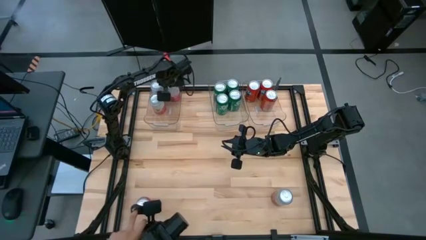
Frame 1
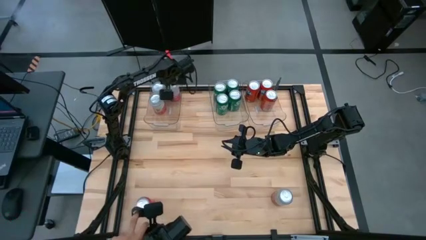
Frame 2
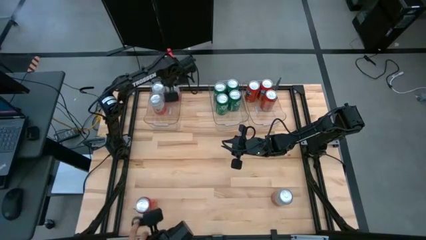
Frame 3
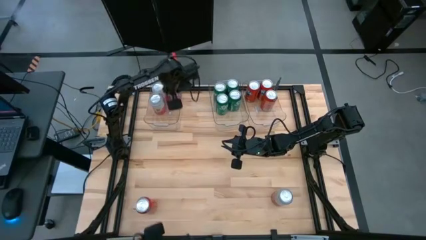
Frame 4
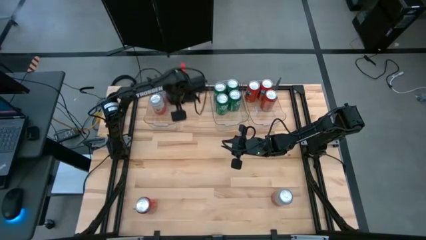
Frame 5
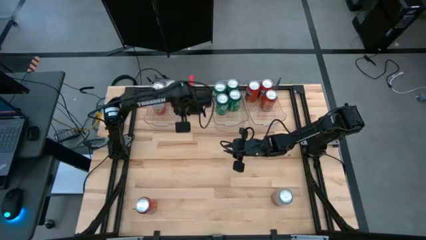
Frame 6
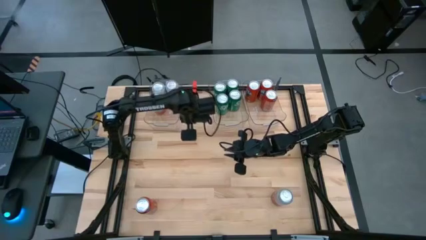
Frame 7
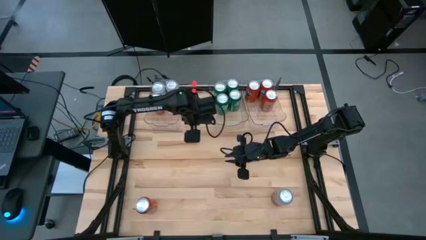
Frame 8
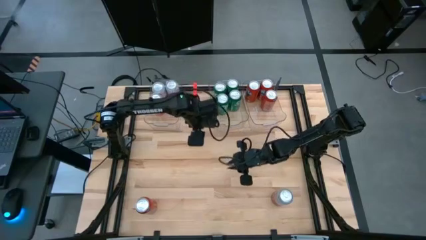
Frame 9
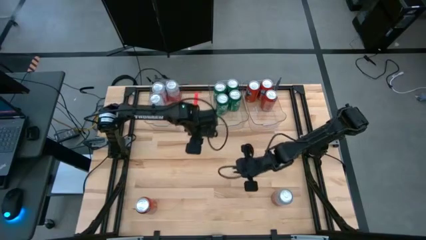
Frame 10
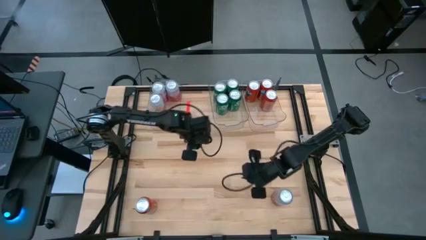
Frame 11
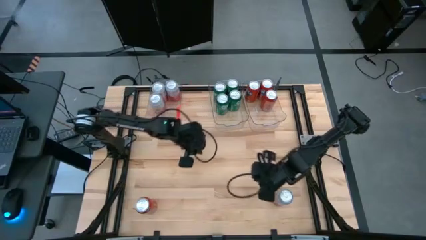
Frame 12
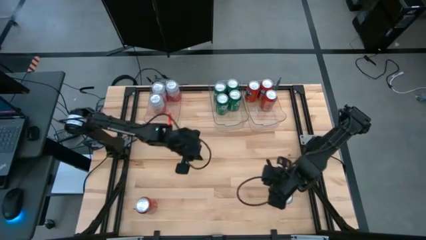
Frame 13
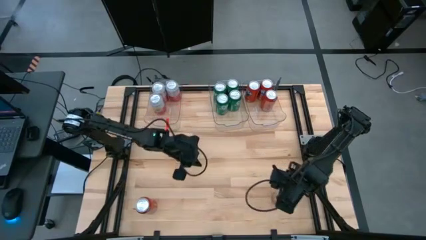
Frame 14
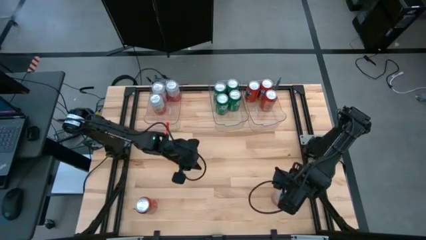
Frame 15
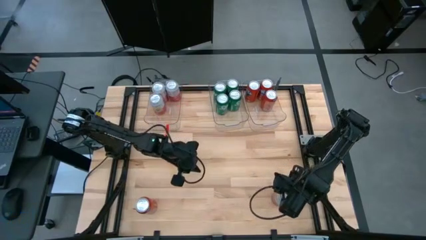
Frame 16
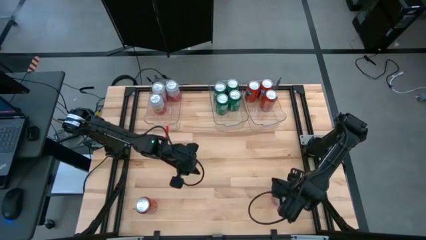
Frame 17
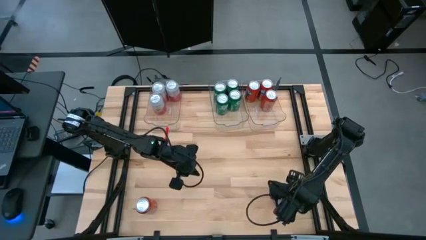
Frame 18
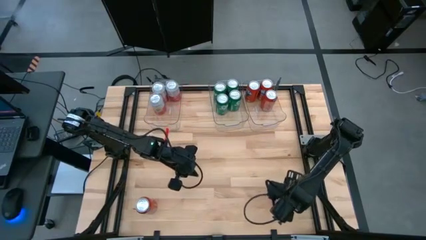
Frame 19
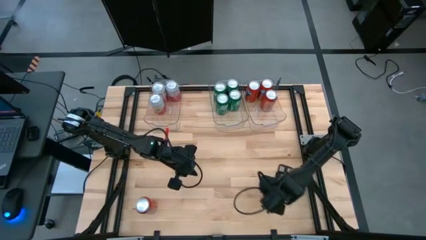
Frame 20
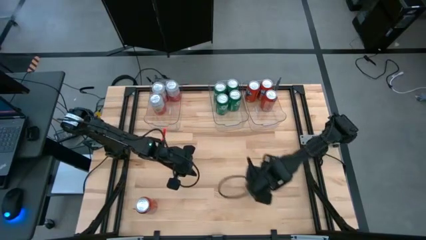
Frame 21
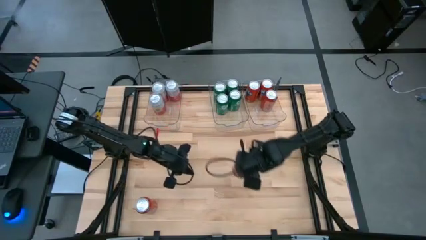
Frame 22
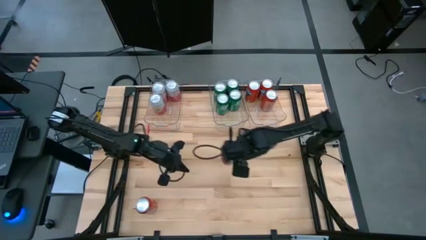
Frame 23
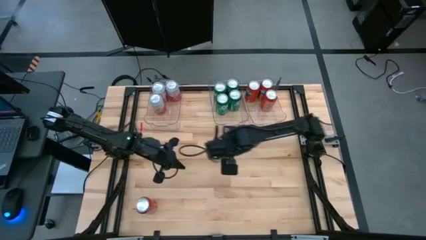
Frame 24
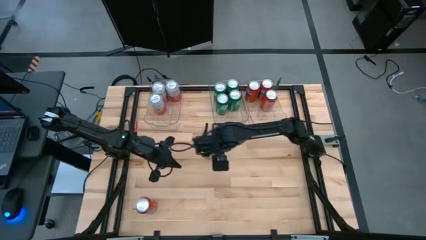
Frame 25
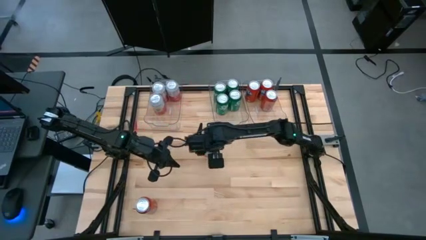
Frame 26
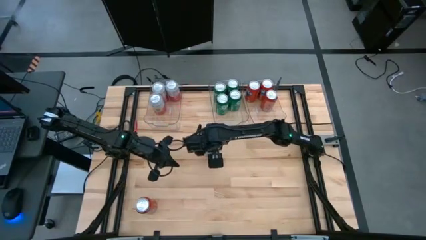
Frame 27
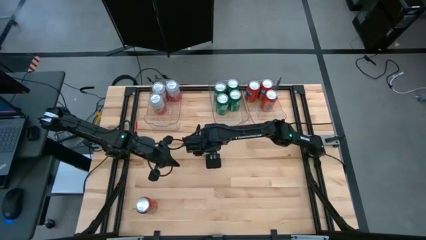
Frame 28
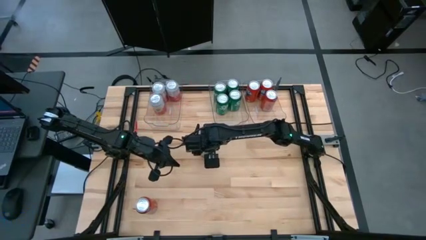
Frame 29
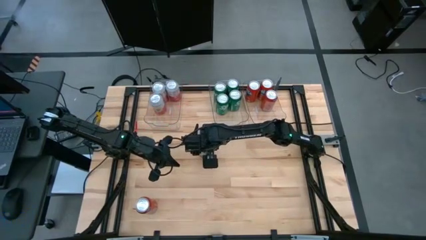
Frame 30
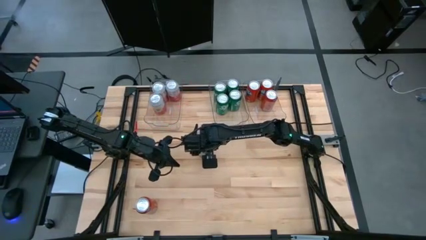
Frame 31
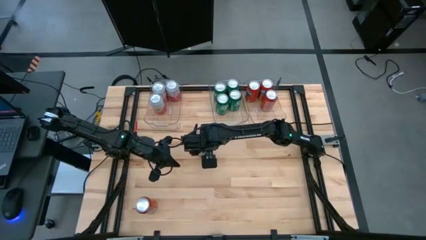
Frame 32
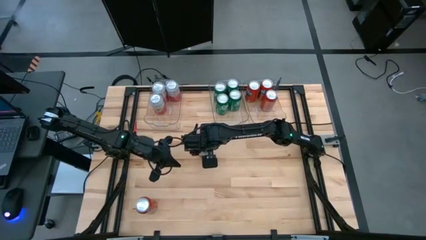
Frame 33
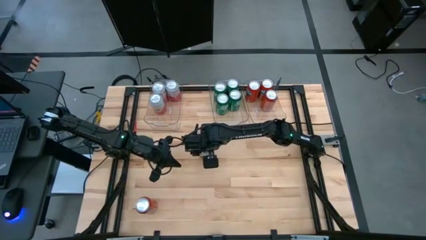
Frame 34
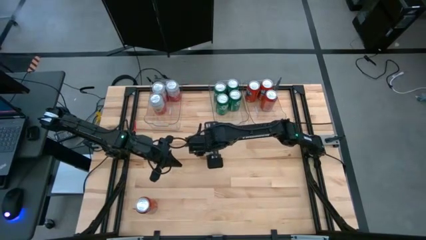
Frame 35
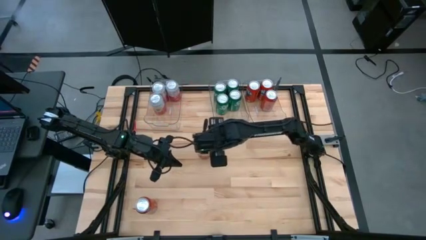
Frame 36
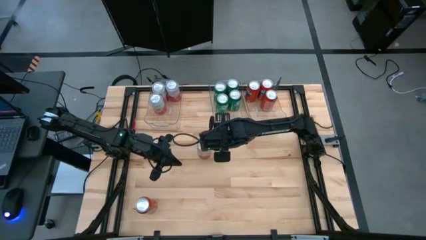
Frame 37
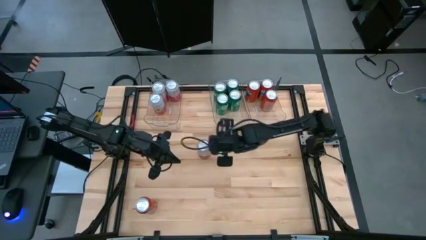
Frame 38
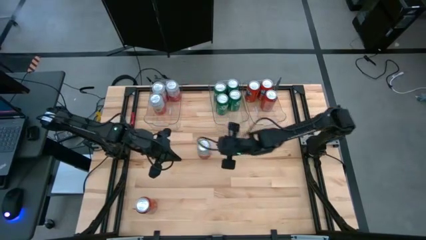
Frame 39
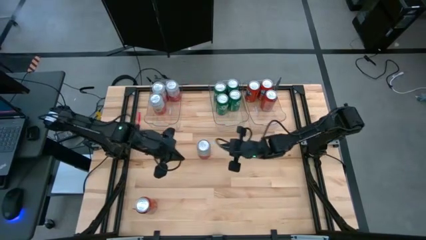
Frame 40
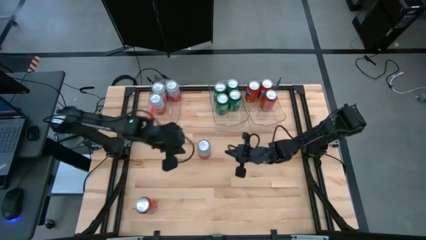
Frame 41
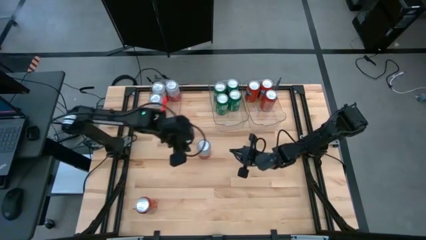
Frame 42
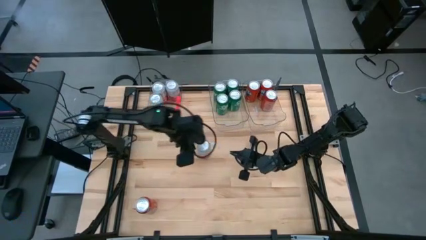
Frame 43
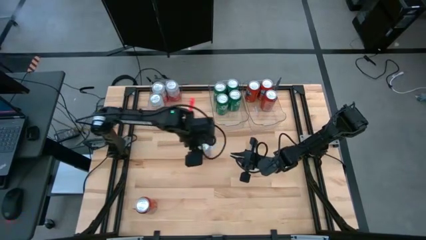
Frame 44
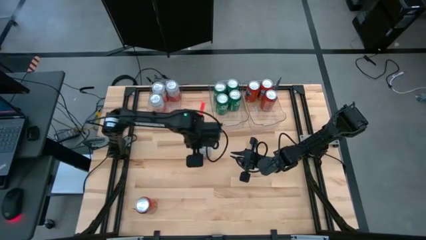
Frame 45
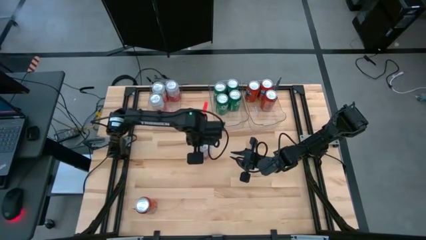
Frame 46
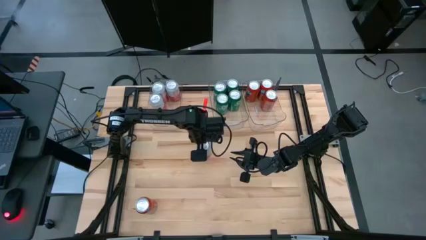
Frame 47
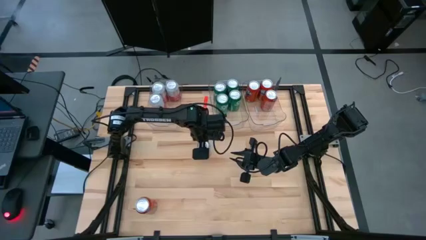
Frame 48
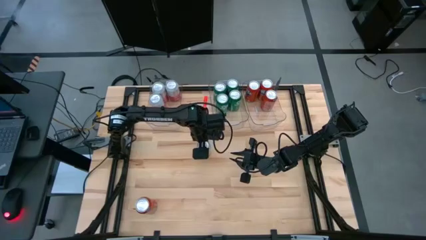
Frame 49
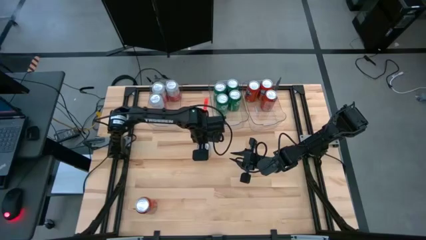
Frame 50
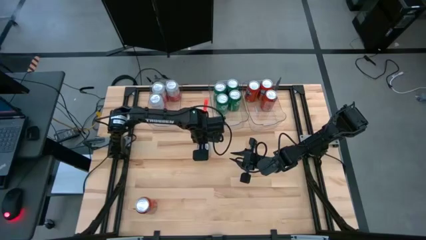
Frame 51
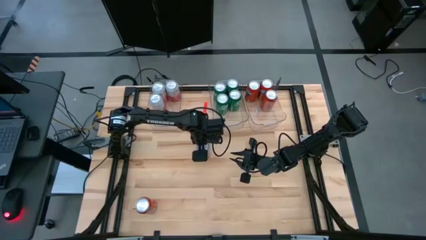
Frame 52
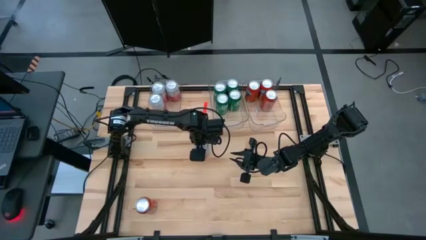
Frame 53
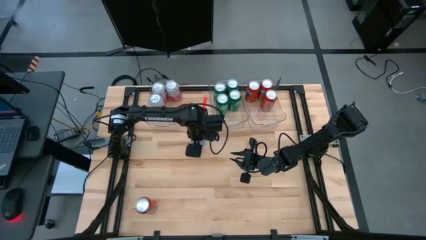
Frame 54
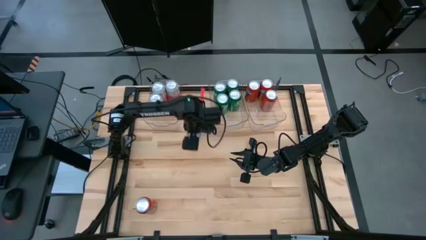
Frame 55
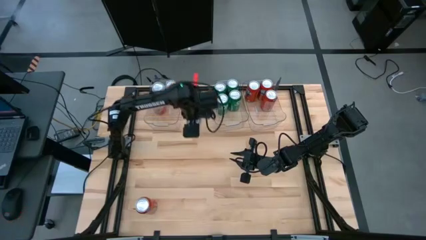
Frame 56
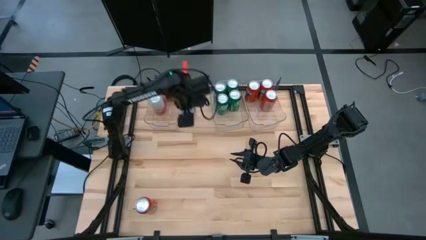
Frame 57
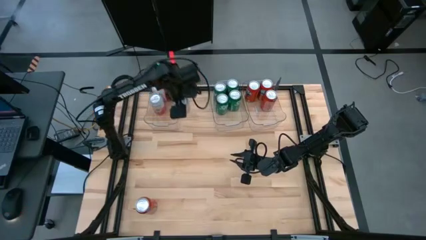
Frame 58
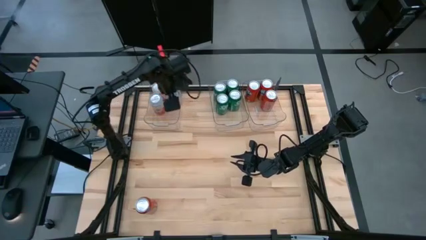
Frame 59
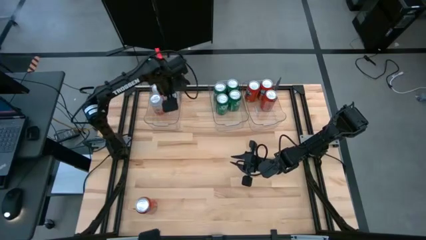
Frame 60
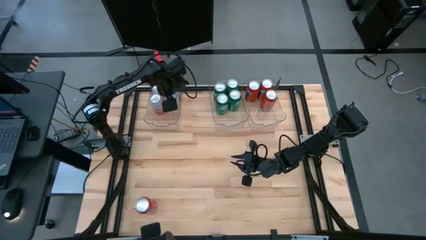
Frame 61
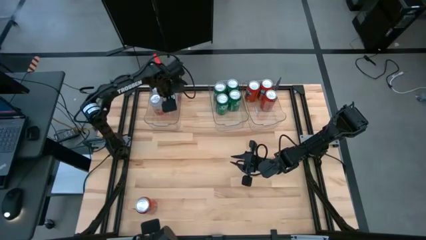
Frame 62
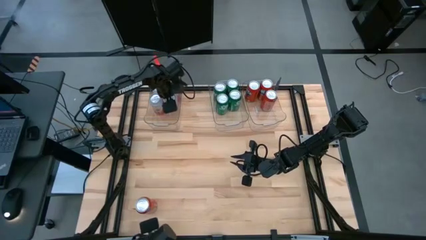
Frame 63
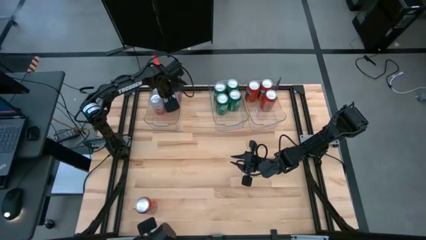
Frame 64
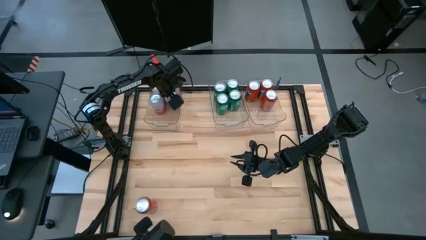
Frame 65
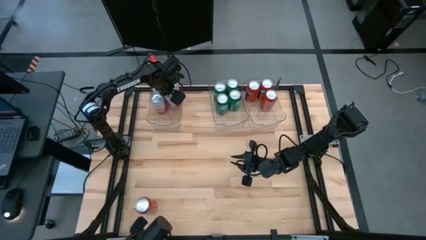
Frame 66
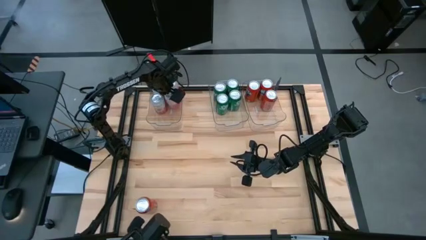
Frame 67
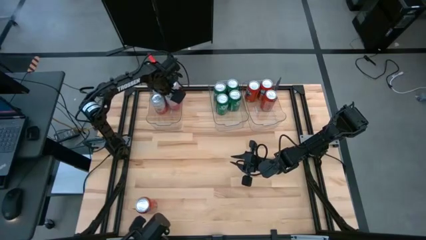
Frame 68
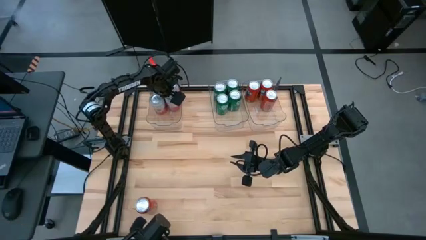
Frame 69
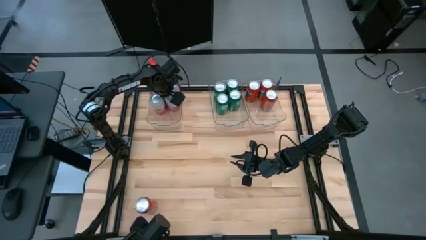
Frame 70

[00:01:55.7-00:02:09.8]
Task: Sort soda cans
Put the white soda can into the left transparent bin

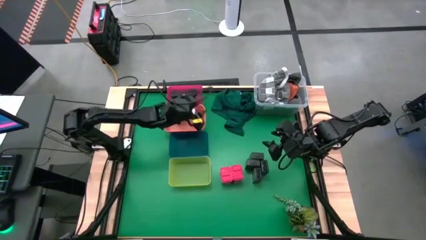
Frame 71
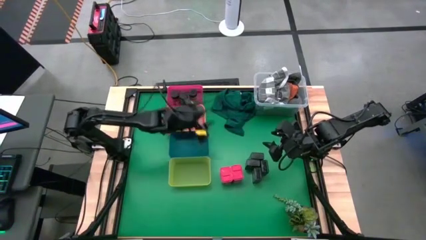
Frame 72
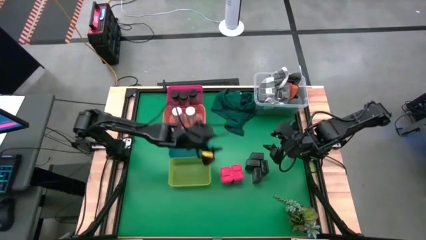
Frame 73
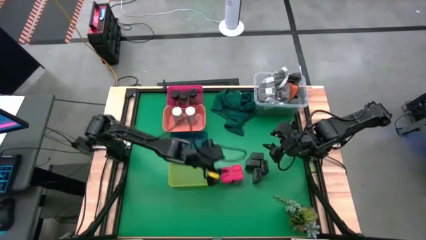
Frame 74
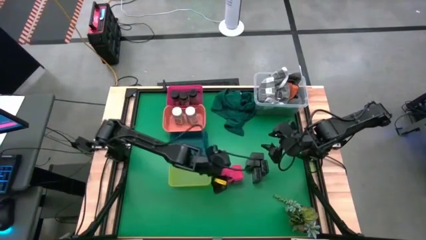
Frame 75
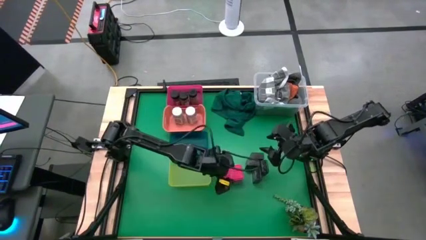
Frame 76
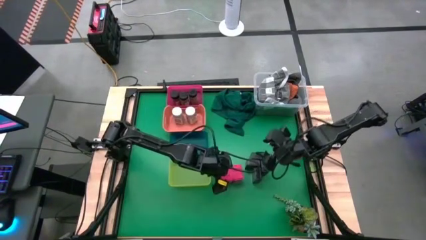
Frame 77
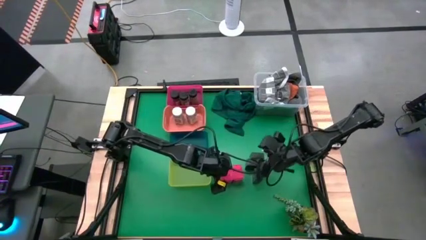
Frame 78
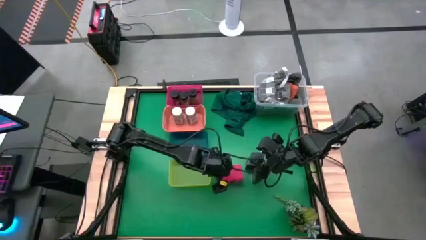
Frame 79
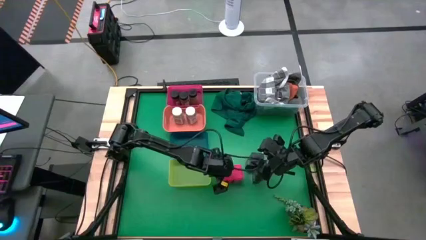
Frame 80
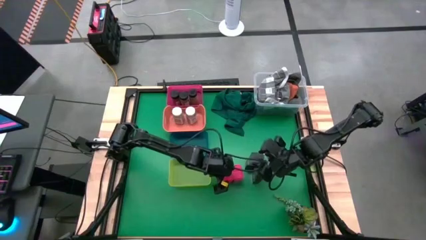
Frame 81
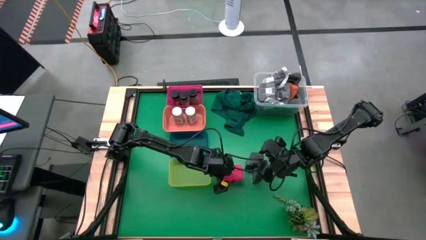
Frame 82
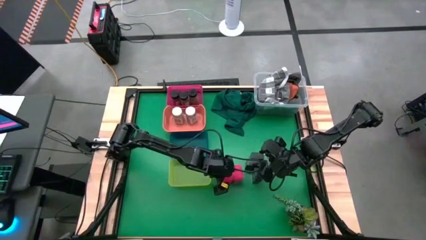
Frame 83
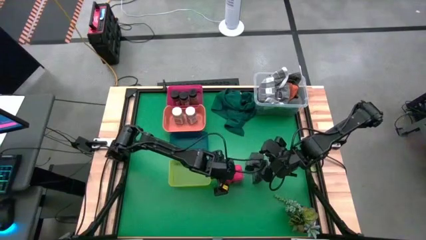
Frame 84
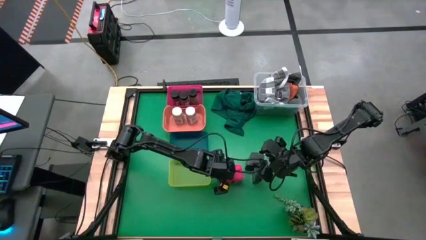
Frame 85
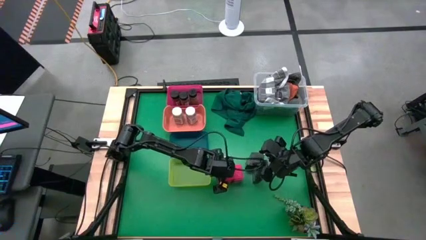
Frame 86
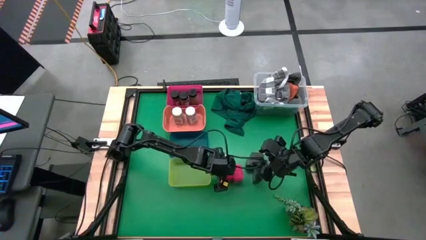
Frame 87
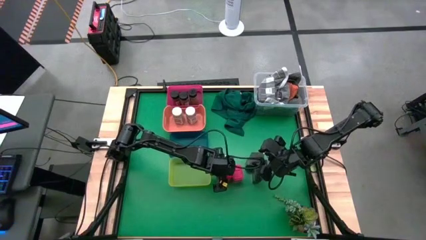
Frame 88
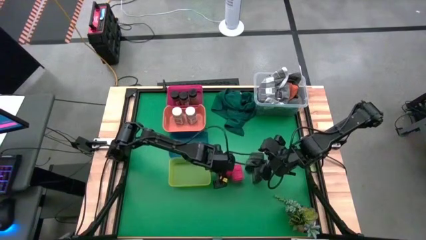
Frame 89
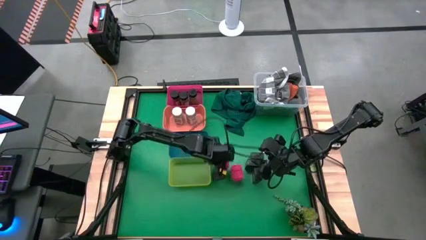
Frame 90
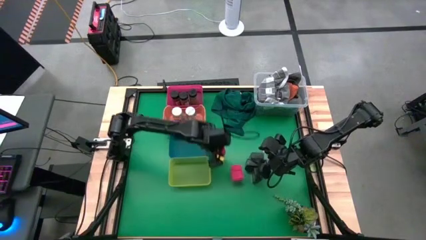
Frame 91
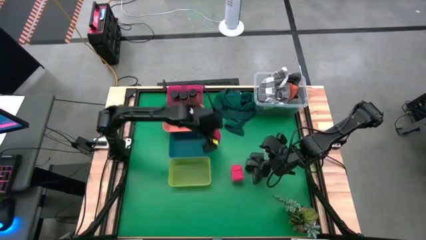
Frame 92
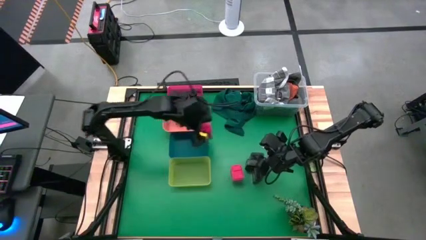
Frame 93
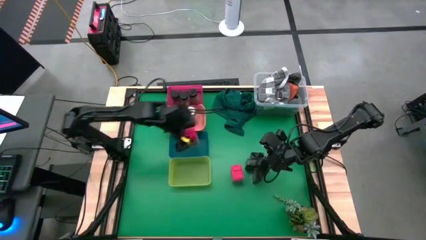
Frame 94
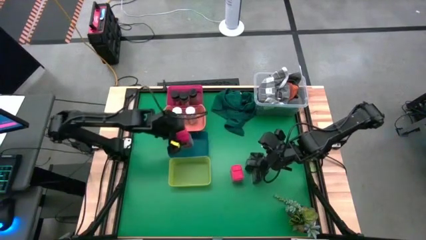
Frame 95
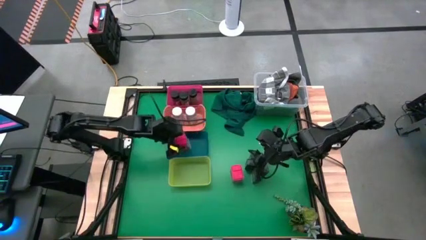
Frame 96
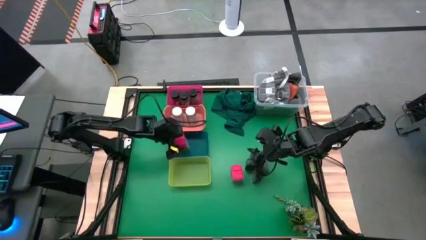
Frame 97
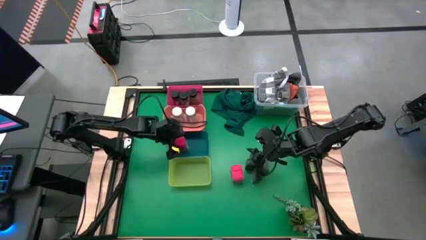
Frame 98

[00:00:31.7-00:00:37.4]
Task: Sort spices by type
Put the left red spice can into the blue bin
